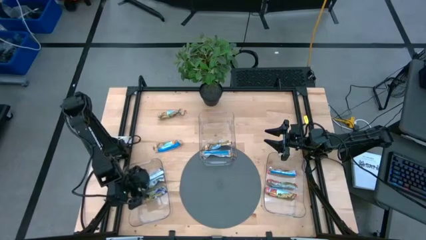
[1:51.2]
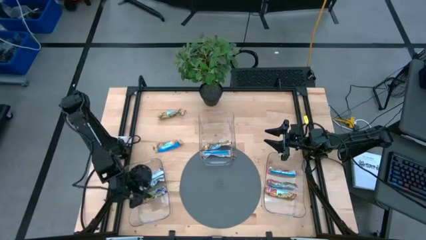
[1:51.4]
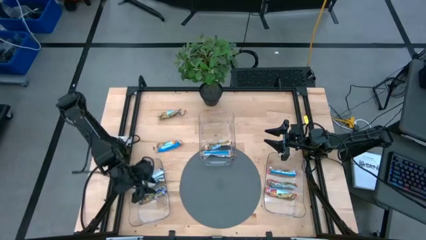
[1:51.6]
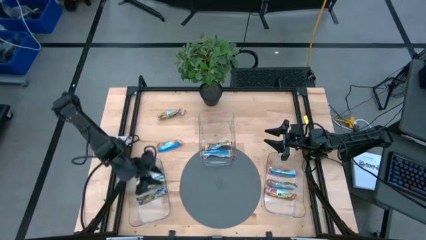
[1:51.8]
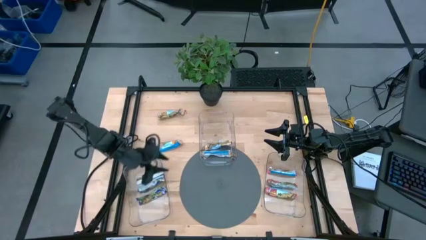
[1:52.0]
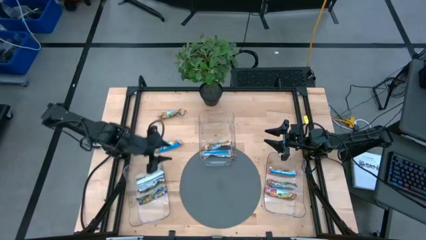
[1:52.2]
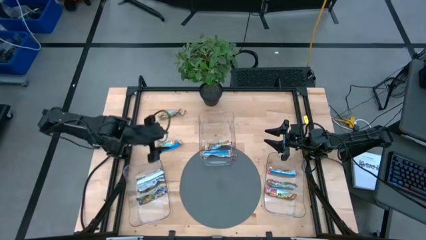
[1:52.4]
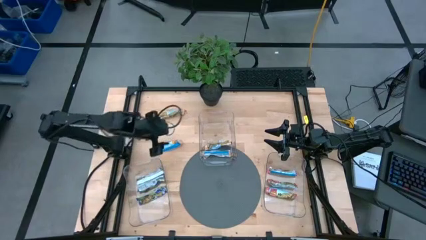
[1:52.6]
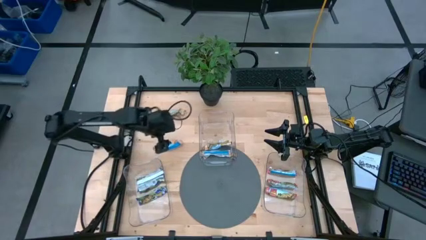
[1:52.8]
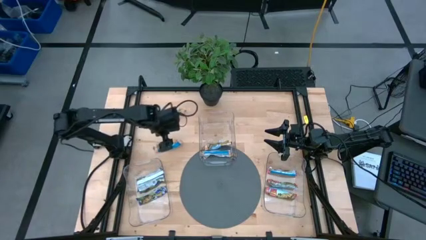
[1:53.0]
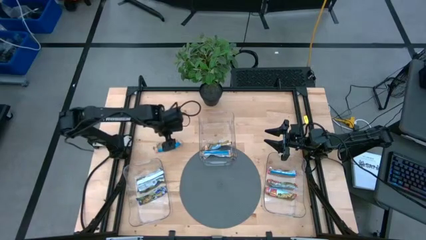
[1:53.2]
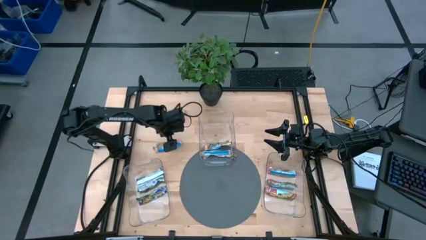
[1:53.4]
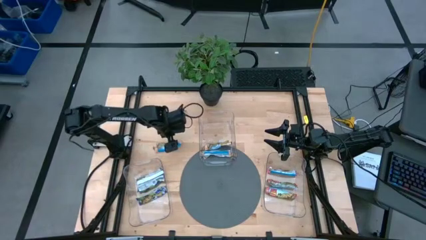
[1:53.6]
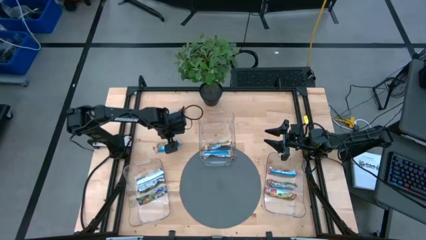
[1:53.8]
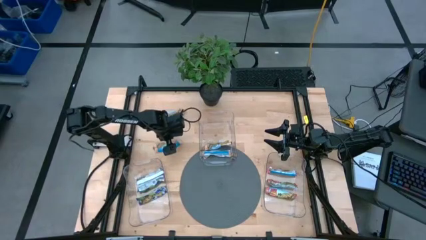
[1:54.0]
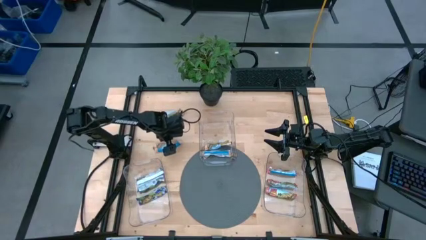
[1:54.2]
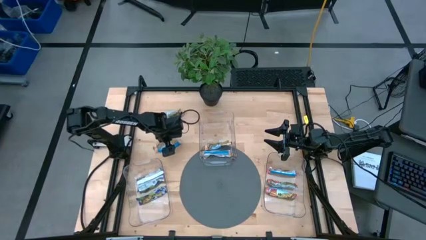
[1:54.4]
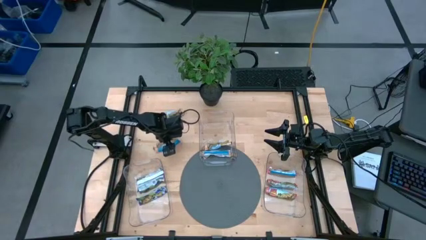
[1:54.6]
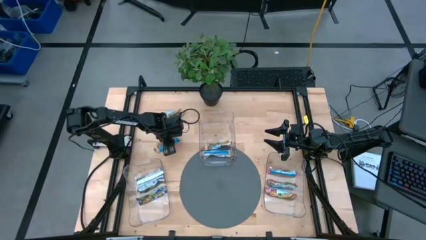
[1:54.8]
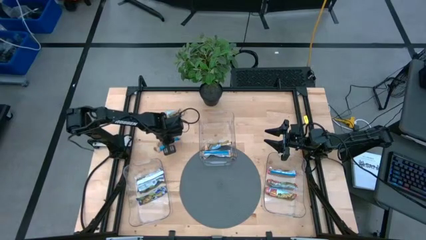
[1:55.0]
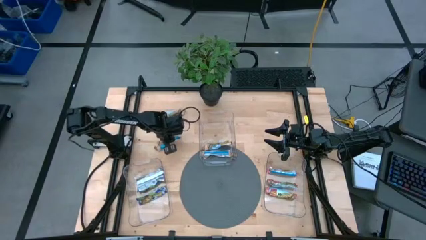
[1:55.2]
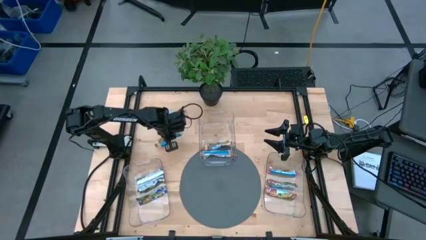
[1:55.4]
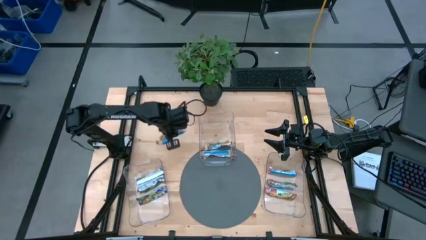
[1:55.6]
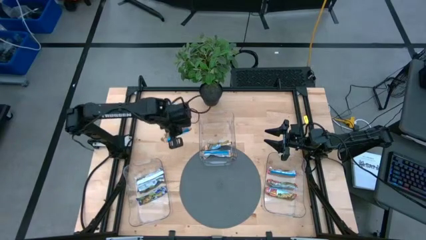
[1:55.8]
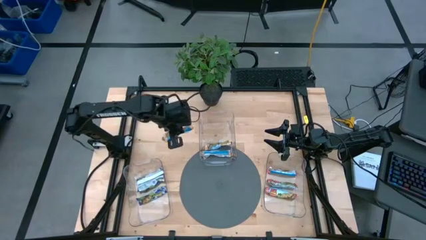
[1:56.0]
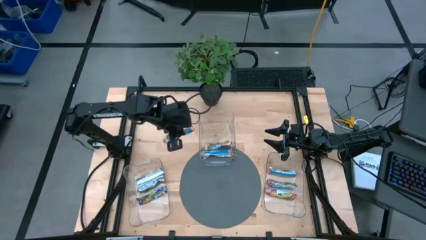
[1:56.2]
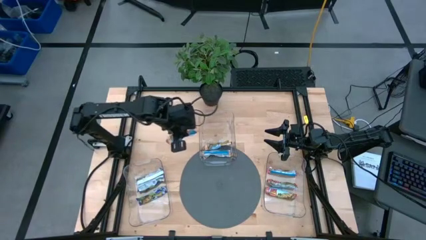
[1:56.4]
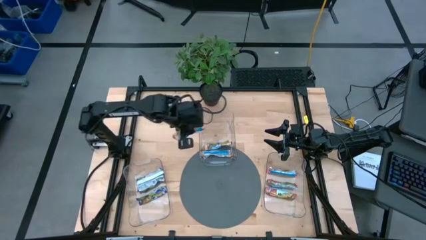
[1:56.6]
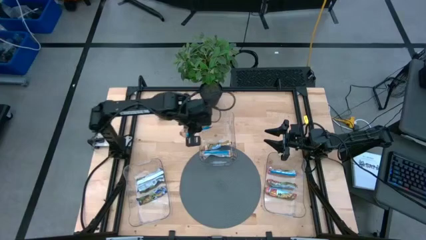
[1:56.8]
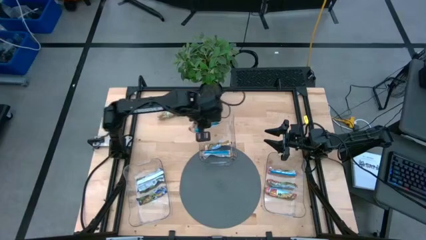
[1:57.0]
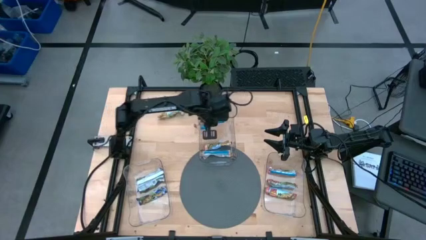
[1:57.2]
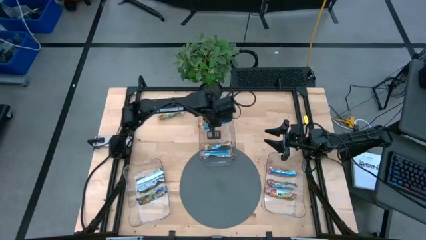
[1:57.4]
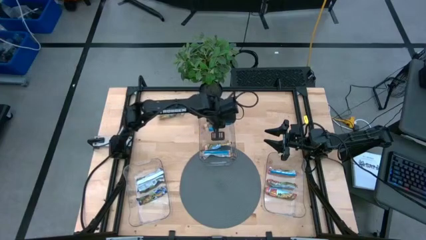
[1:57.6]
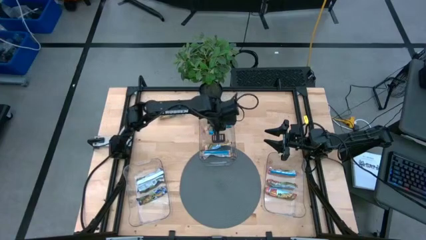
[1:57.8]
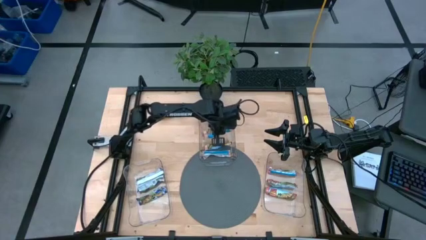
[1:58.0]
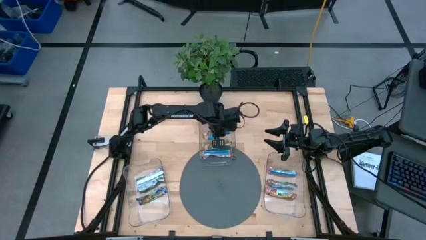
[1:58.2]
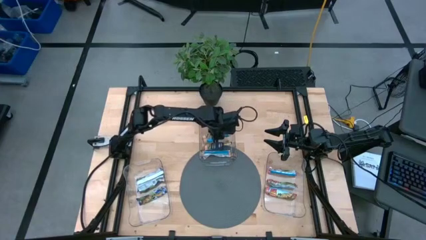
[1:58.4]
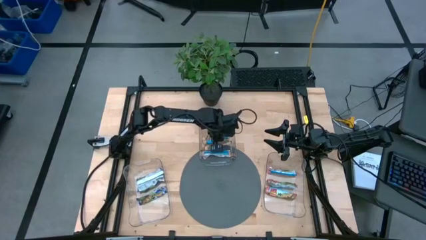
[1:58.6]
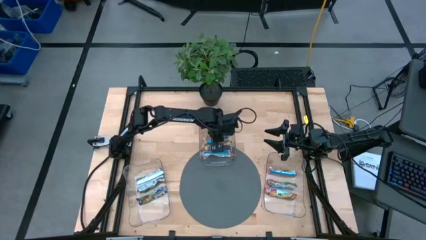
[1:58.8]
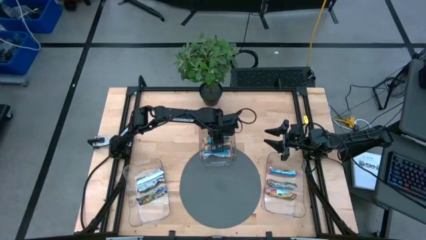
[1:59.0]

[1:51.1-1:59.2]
Task: Pick and place Granola Bars by type
Put the bottom yellow granola bar into the middle transparent bin

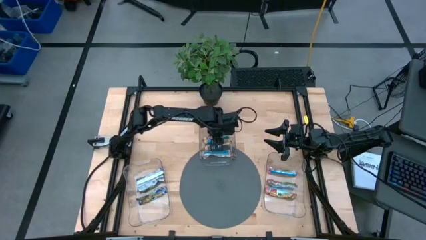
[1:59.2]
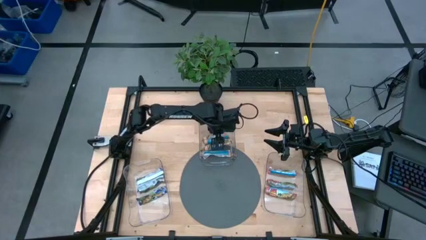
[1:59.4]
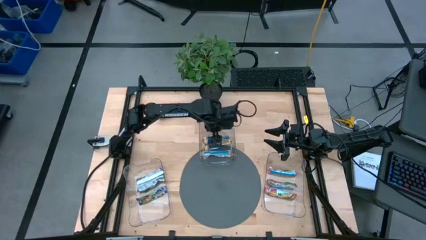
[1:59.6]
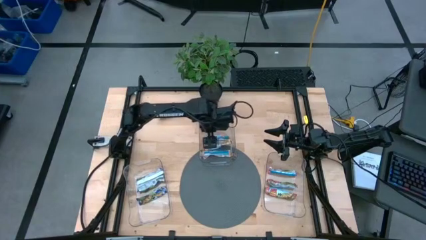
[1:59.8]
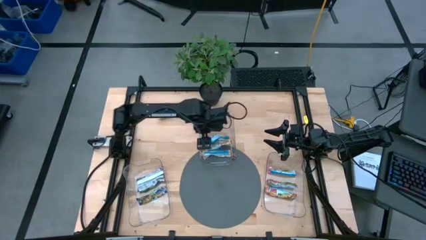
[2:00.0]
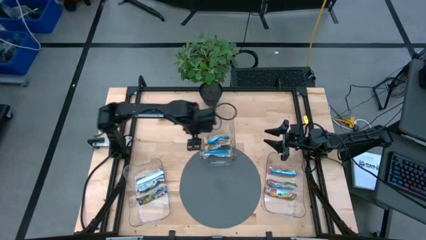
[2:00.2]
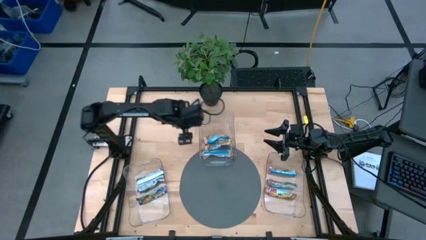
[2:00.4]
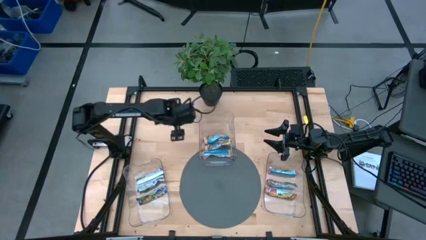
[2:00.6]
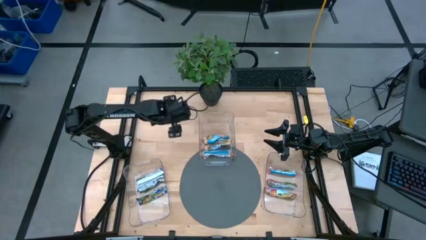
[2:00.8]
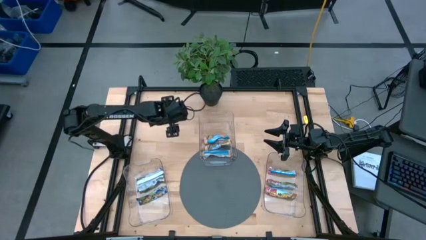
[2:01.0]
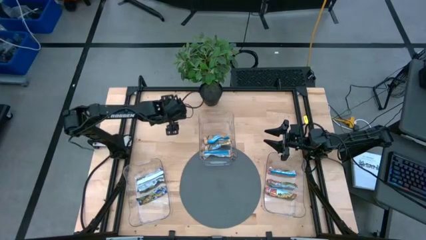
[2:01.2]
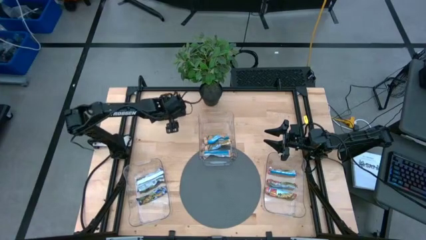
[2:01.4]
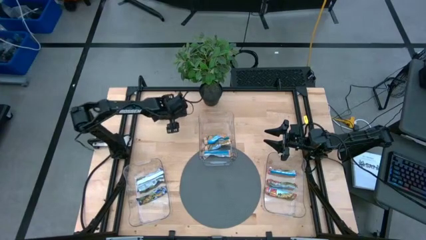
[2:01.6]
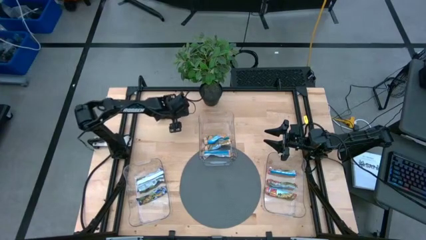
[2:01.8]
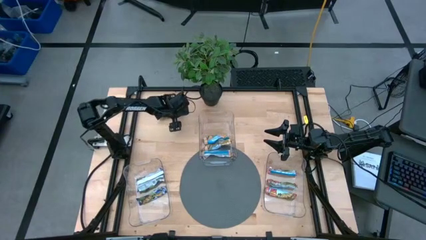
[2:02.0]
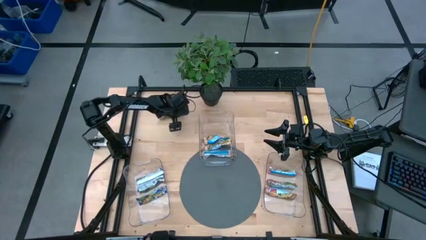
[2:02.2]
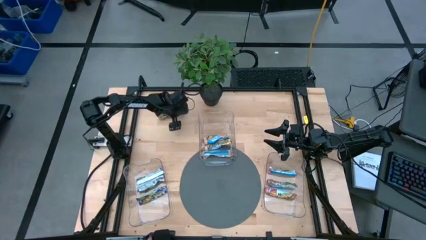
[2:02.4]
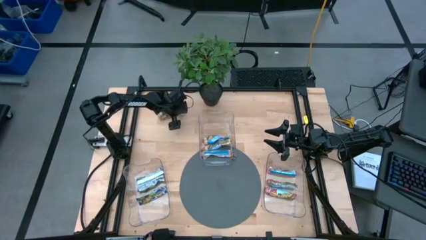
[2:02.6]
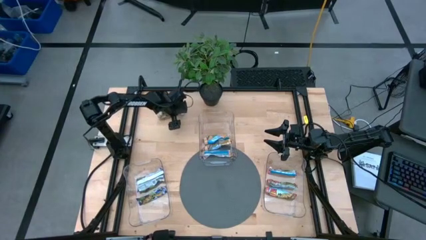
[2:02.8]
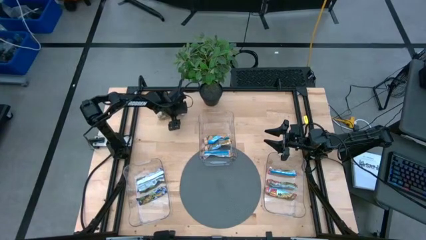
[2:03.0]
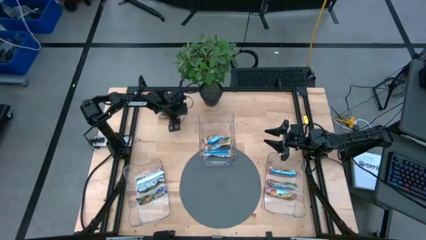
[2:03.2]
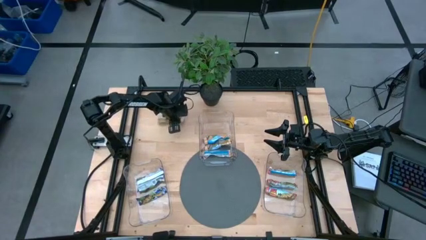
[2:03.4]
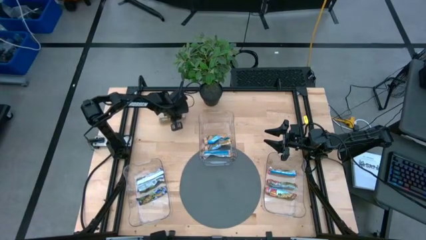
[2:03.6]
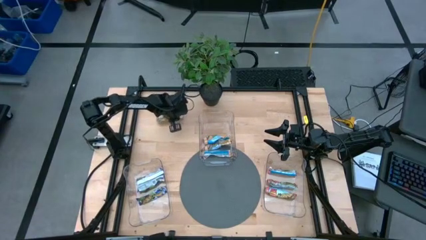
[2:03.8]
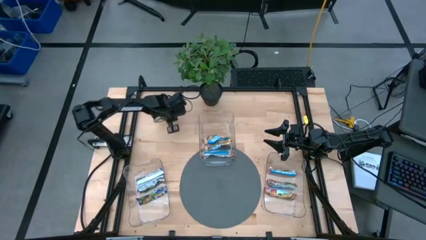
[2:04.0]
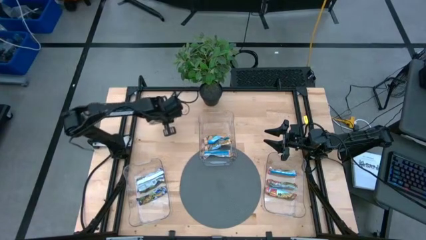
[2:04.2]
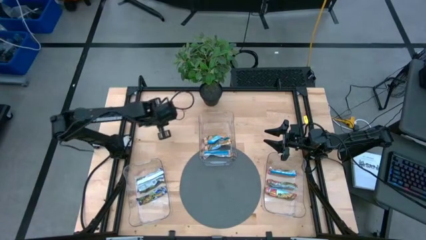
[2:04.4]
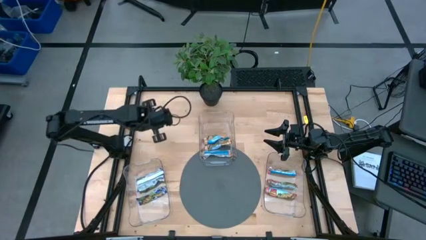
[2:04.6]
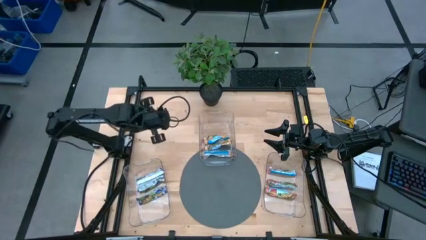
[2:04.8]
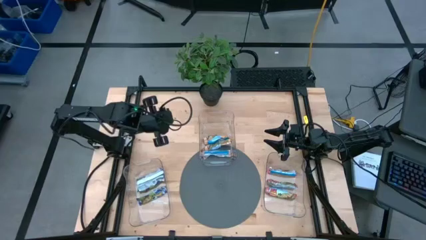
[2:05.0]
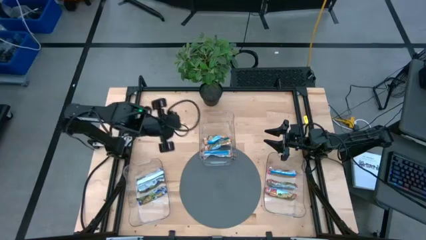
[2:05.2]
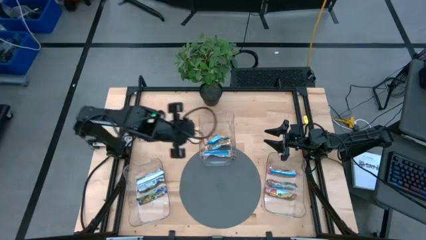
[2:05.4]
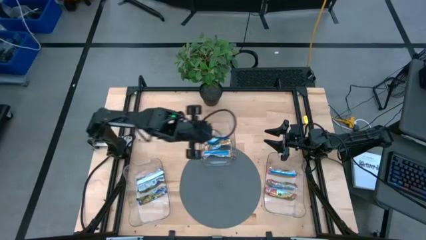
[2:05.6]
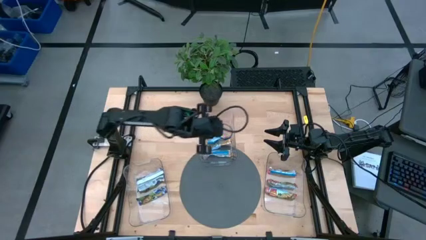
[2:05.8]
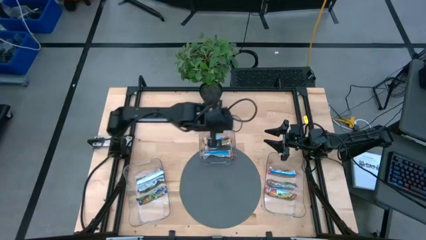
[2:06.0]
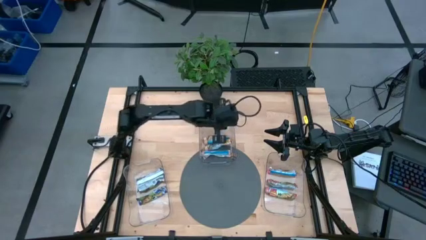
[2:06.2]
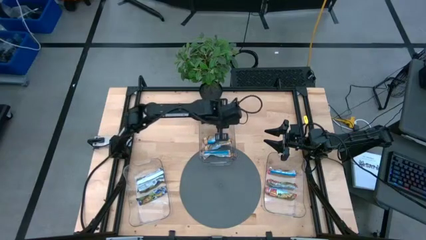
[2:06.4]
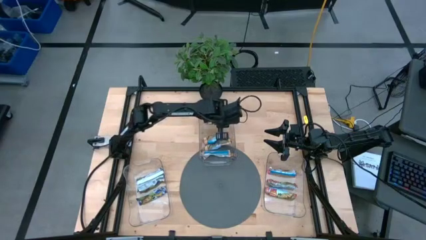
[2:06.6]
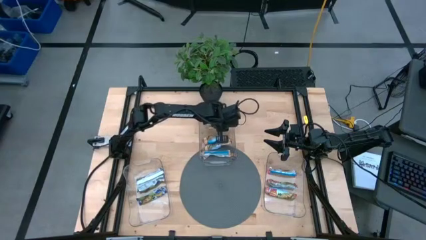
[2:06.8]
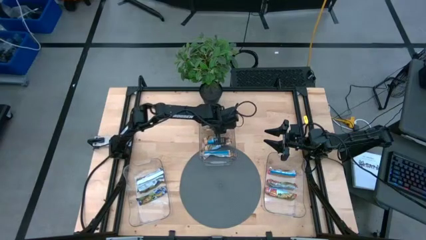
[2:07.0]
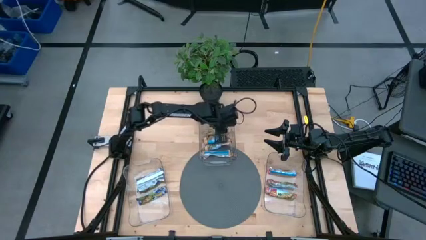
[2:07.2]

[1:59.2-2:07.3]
Put the yellow granola bar into the middle transparent bin
